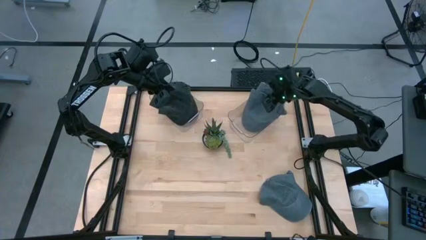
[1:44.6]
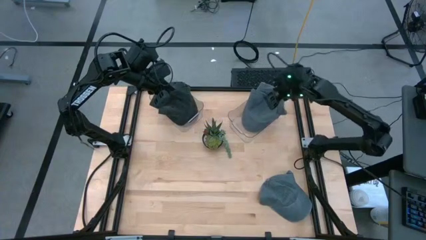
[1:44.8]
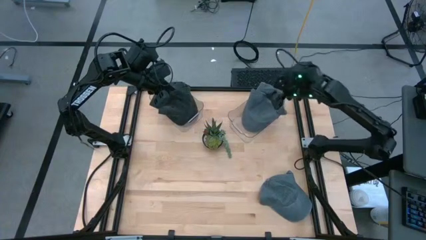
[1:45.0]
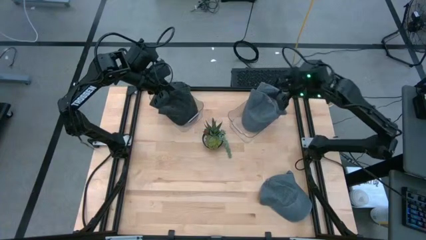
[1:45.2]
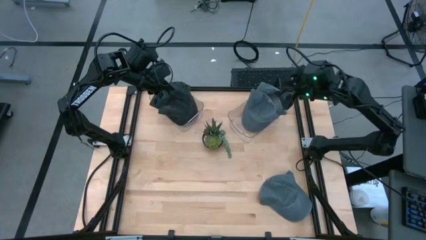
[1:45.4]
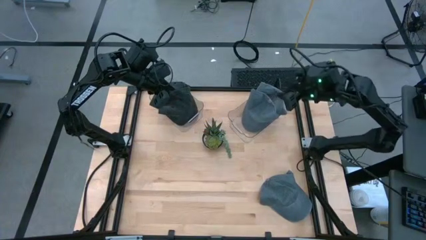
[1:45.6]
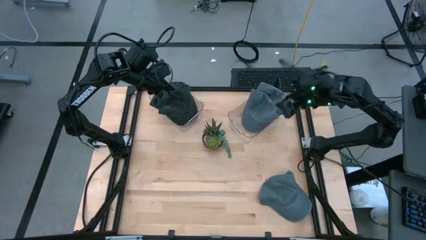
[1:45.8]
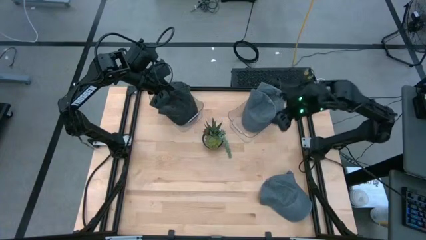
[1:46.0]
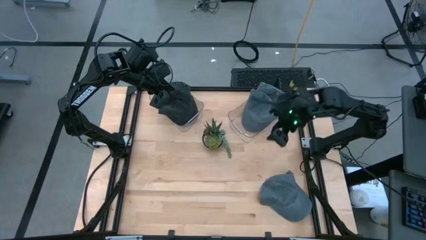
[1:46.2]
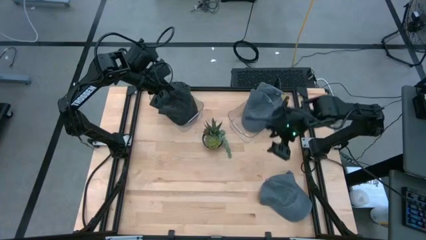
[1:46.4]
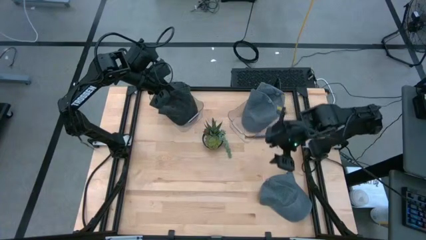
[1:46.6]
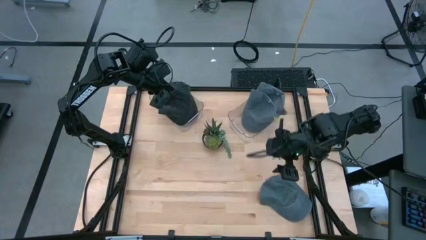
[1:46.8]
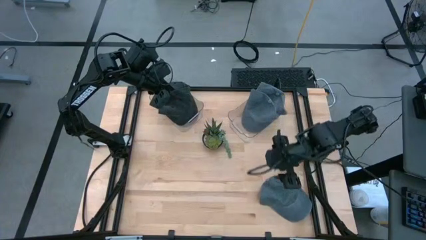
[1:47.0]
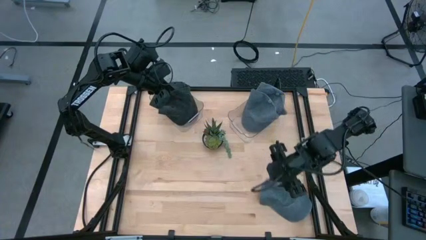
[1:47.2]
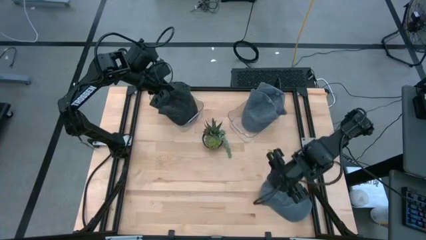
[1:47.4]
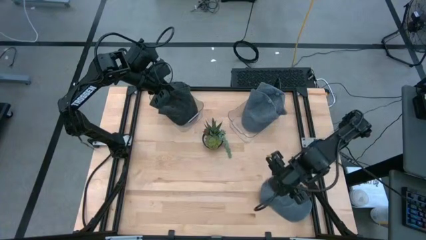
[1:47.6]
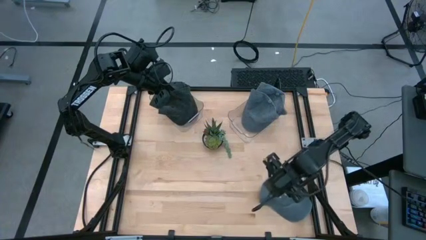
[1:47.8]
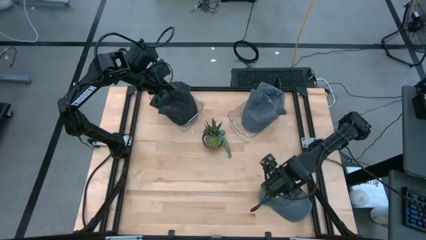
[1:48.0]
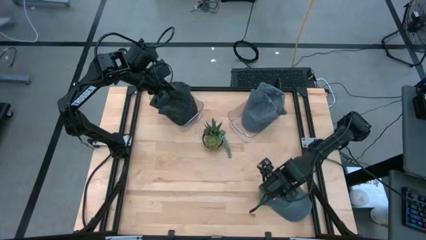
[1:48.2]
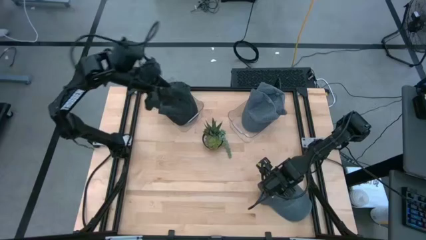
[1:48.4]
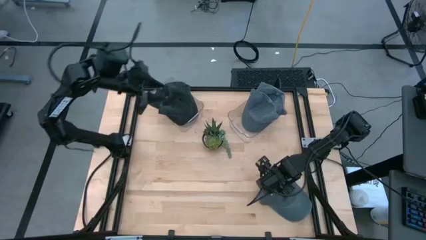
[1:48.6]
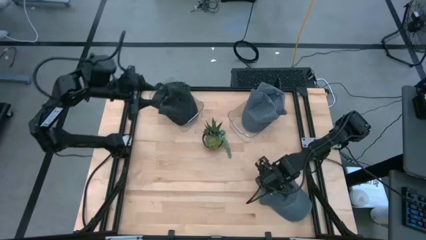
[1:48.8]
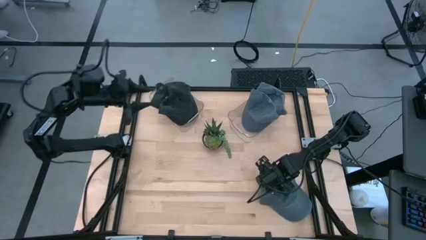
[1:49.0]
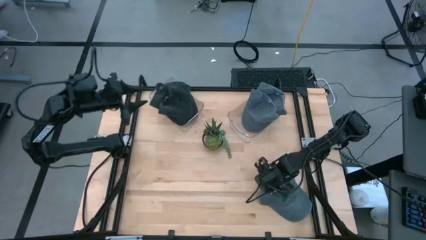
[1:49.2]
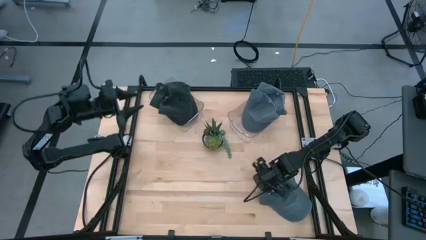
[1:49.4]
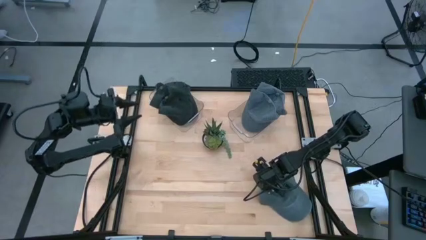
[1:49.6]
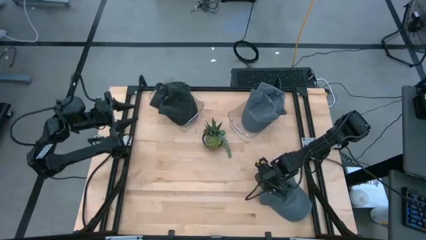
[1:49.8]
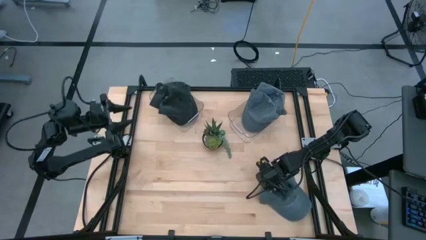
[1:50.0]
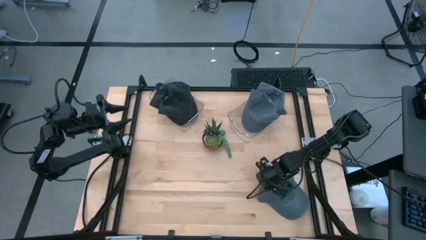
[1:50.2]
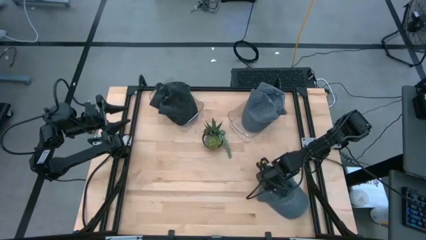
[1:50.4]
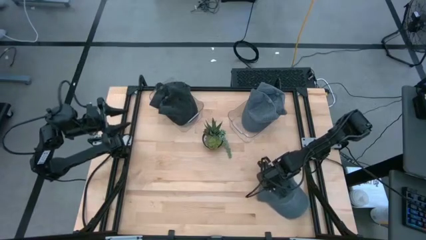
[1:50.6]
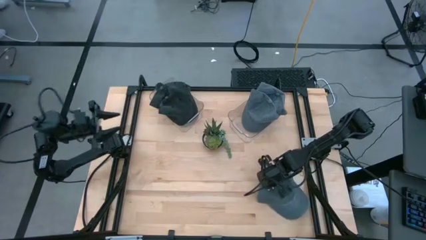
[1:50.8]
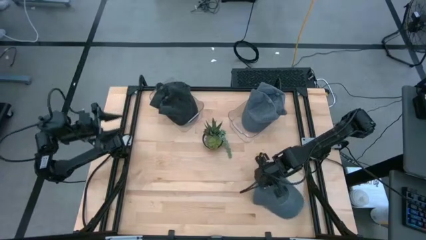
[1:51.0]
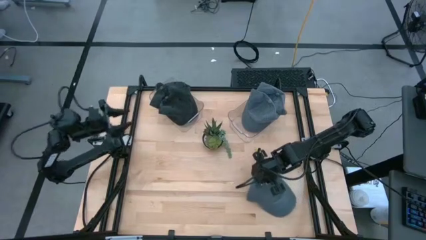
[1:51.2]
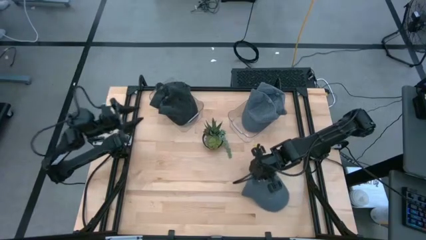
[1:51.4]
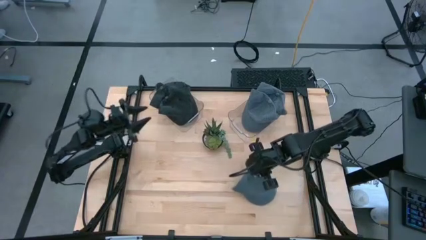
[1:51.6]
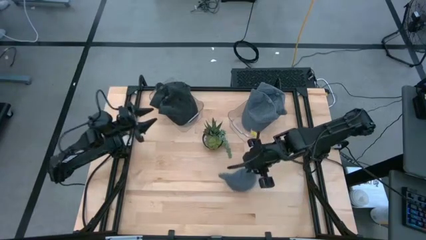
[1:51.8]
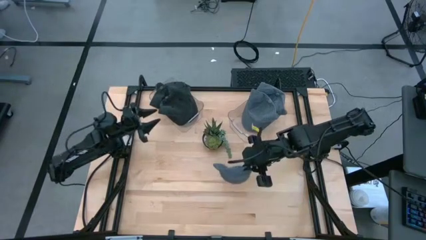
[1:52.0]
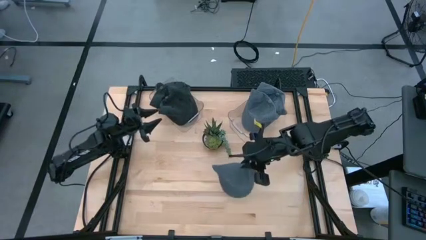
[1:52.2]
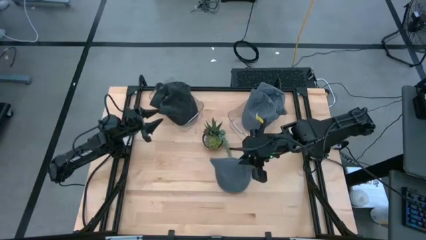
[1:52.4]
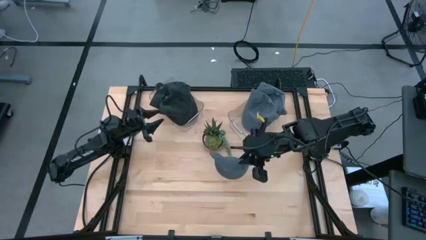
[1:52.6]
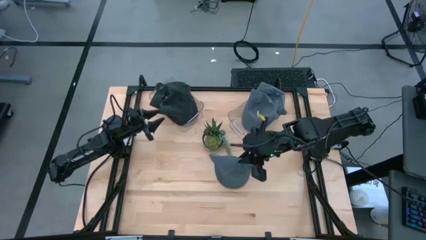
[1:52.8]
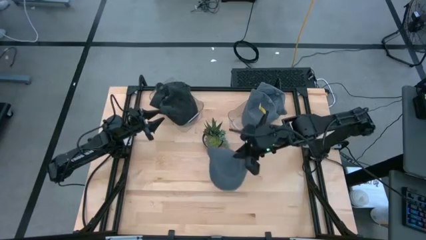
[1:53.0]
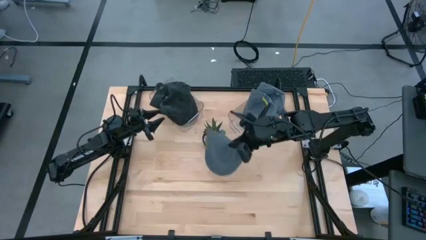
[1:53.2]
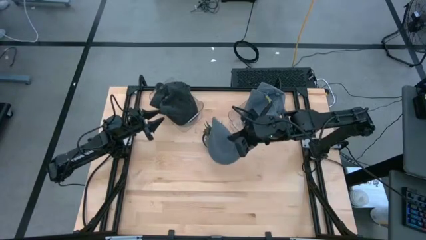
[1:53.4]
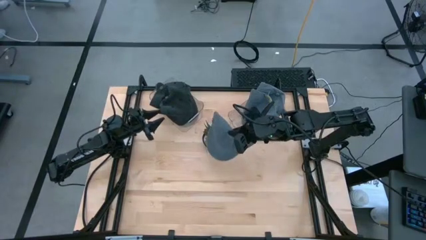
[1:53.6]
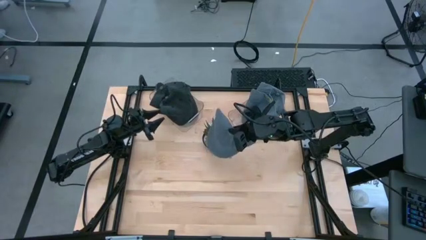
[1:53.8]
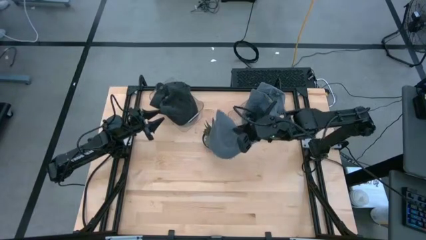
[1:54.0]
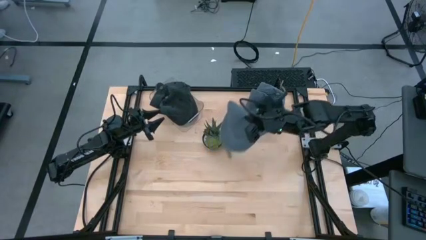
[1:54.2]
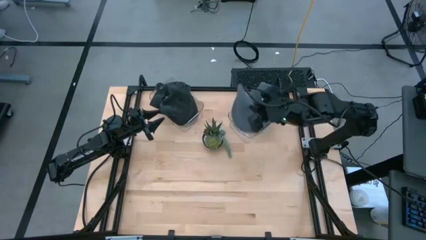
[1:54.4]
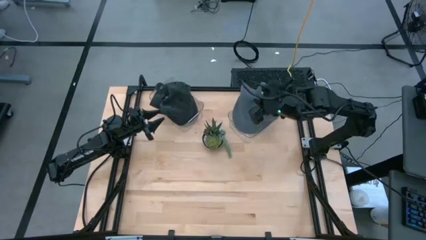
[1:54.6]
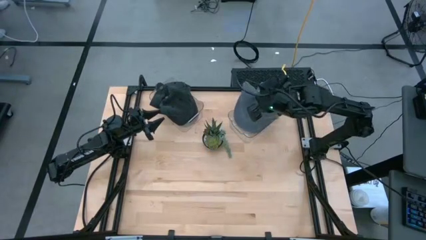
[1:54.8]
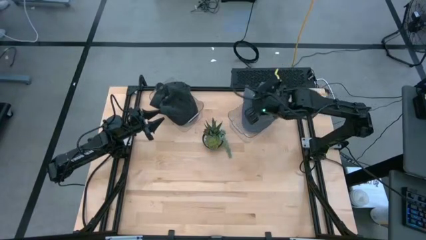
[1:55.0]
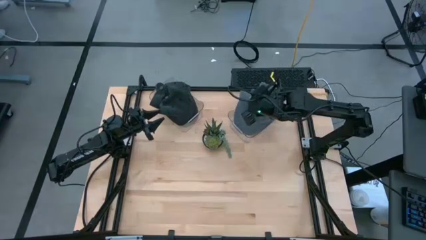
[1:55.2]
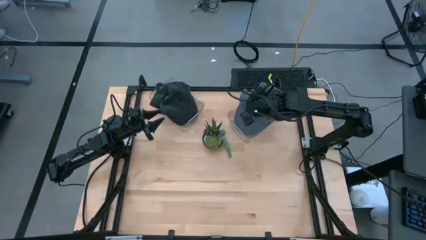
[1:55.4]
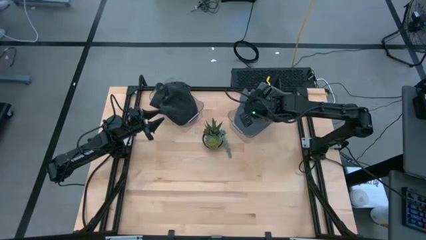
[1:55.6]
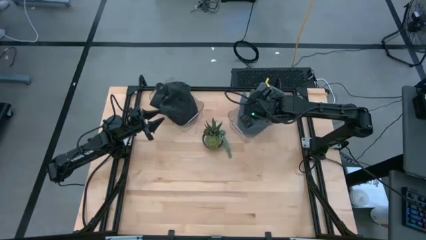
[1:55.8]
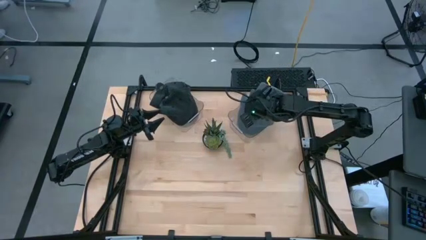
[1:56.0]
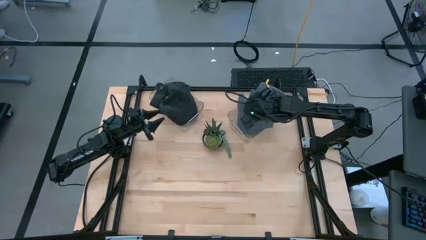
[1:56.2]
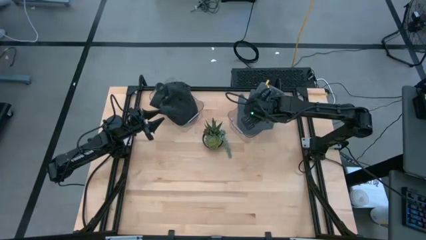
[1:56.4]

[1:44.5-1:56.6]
Task: Pick & Place hat
Put the blue cap into the right transparent bin

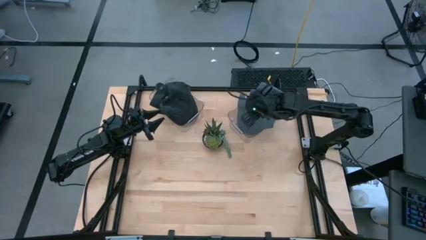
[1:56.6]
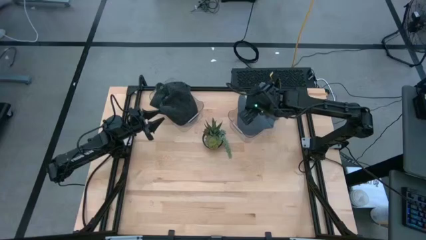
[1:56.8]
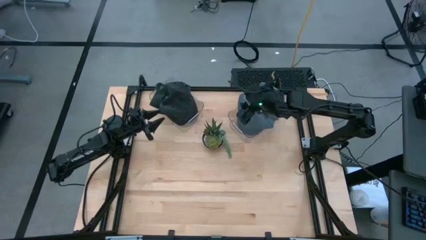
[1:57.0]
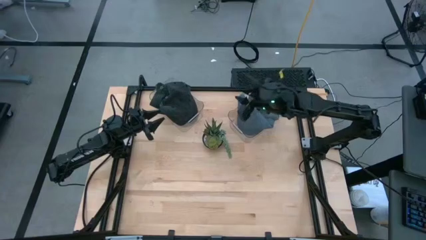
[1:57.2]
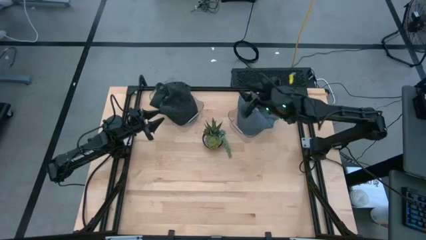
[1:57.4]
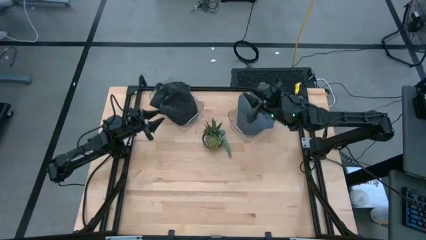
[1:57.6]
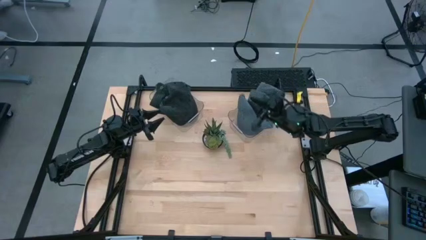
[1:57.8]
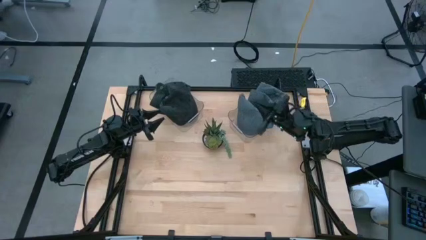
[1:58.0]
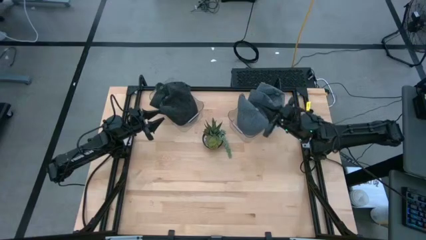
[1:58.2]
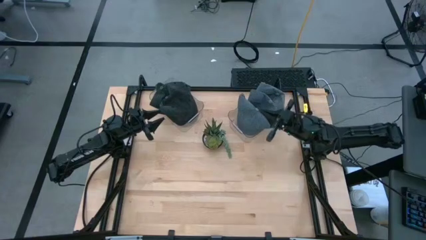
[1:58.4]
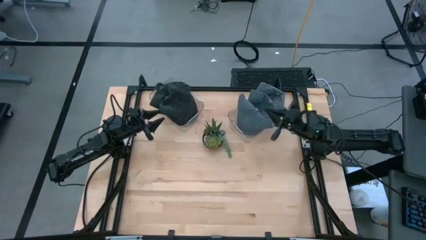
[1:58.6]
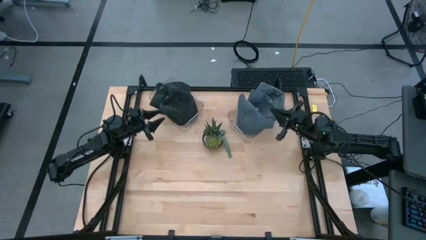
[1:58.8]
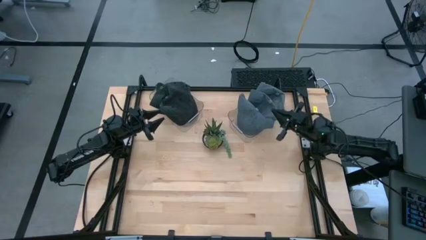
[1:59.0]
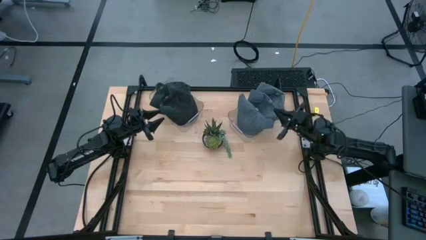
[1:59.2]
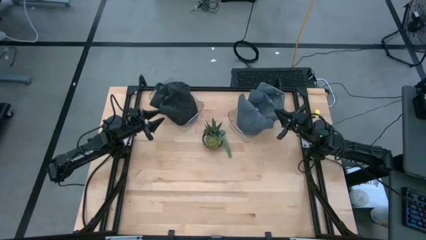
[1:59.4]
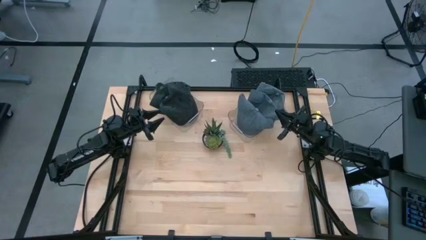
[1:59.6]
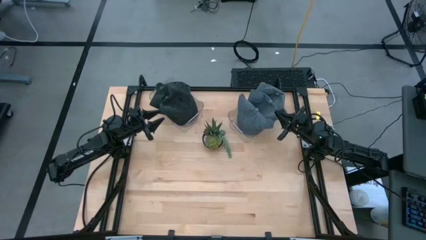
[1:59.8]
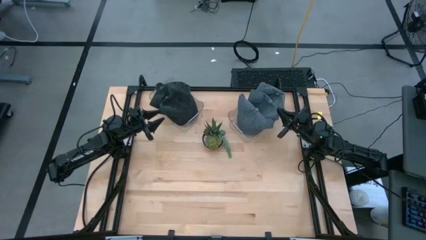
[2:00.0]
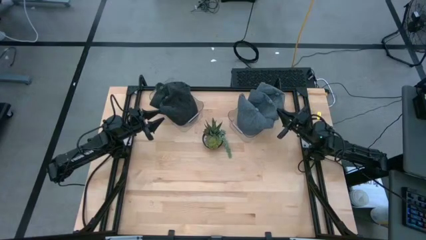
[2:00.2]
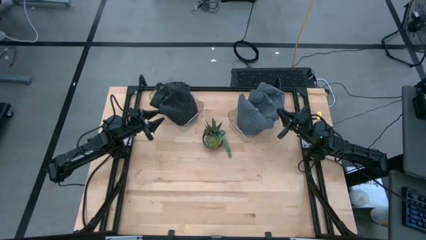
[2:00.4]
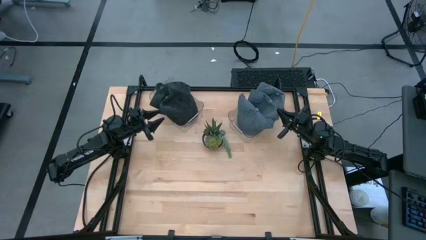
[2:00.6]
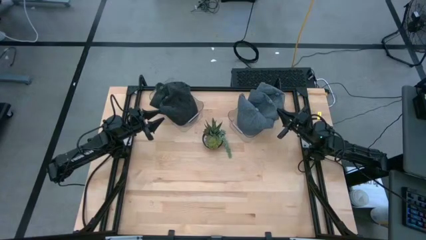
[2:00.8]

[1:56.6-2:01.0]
Return to Home Position
